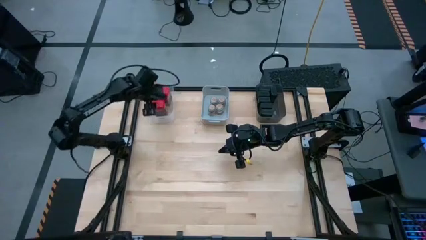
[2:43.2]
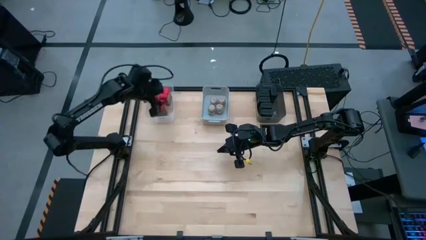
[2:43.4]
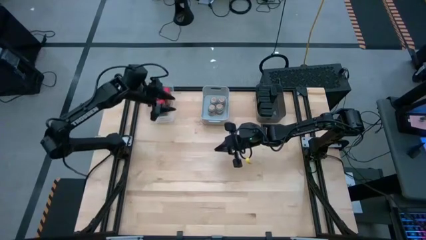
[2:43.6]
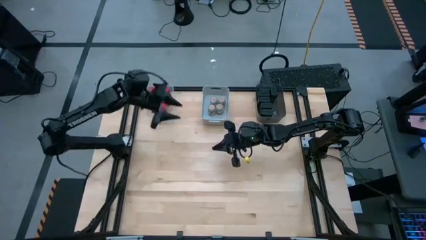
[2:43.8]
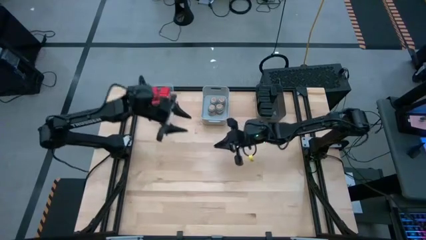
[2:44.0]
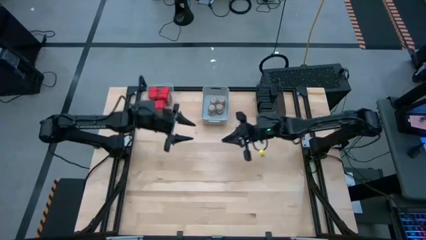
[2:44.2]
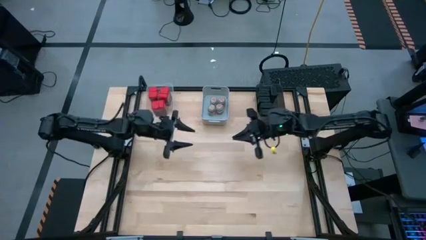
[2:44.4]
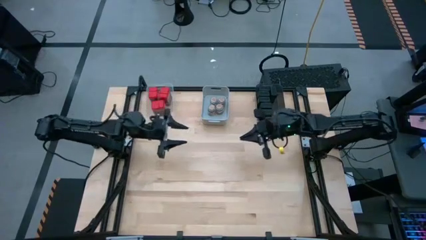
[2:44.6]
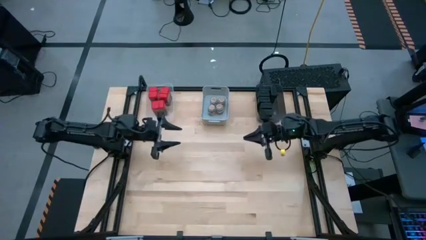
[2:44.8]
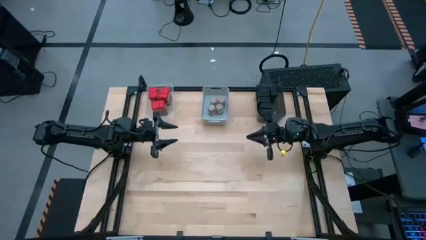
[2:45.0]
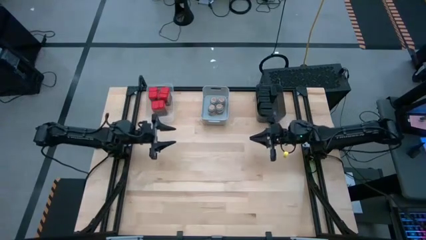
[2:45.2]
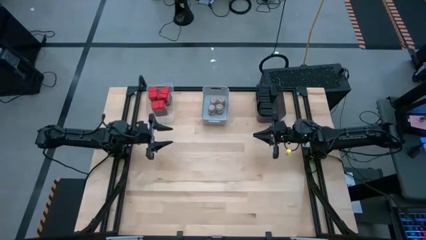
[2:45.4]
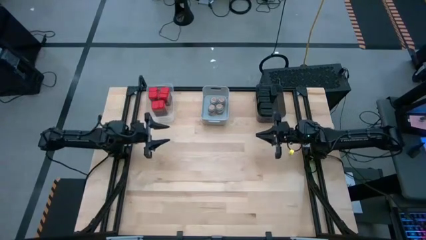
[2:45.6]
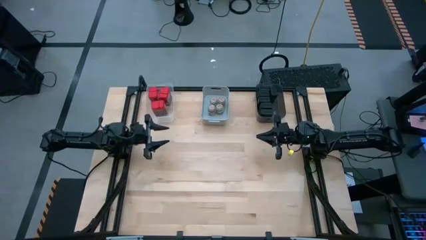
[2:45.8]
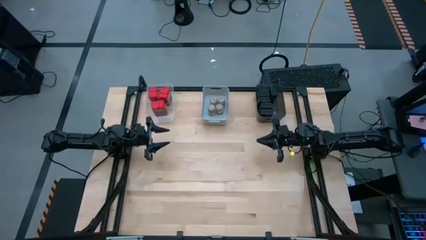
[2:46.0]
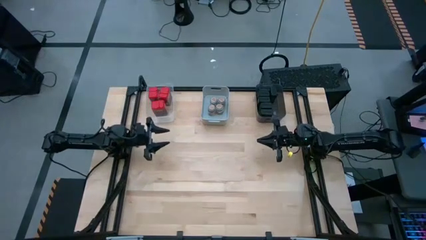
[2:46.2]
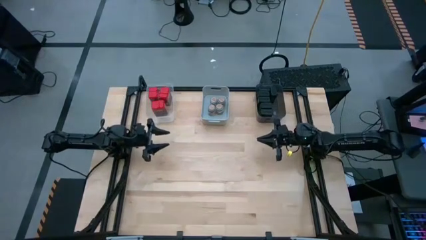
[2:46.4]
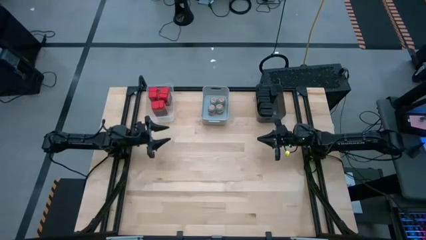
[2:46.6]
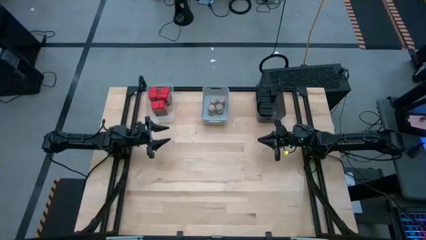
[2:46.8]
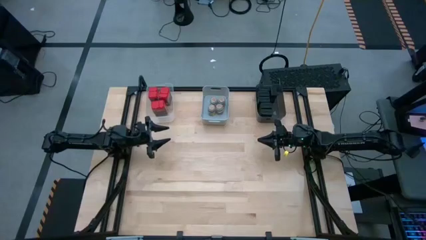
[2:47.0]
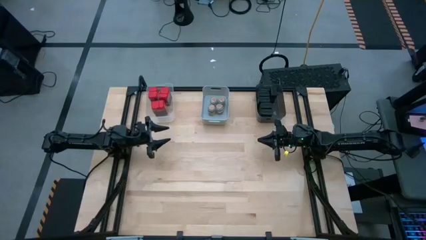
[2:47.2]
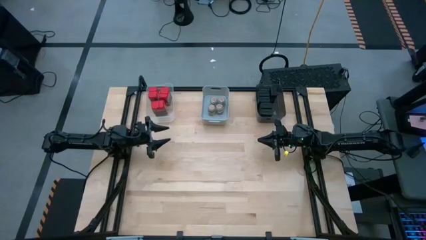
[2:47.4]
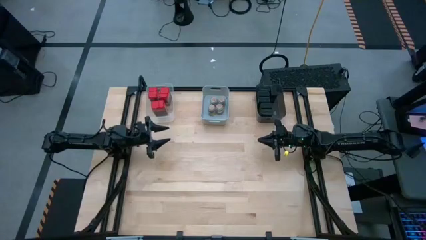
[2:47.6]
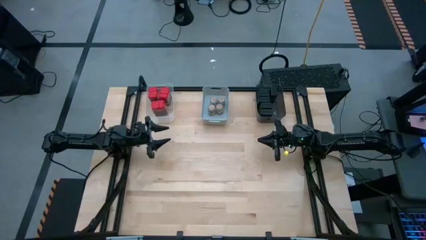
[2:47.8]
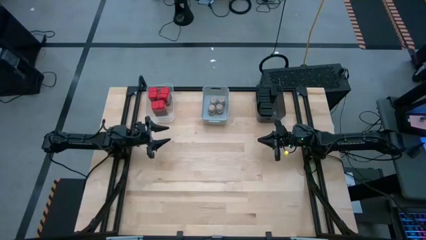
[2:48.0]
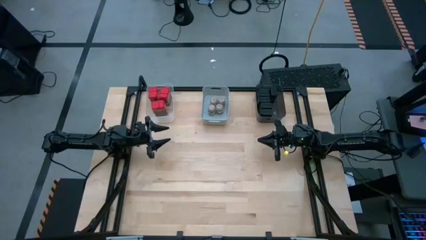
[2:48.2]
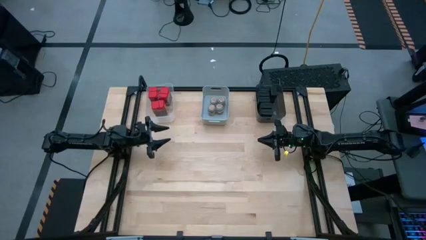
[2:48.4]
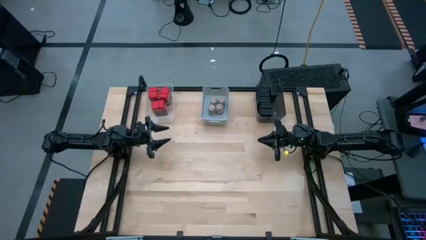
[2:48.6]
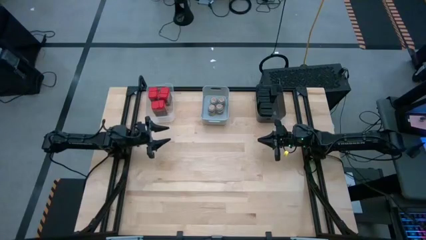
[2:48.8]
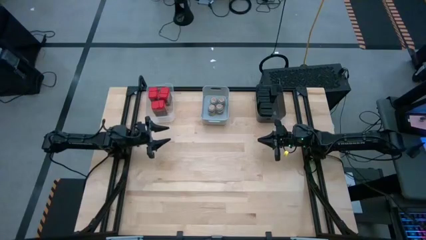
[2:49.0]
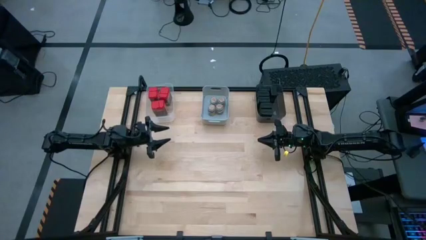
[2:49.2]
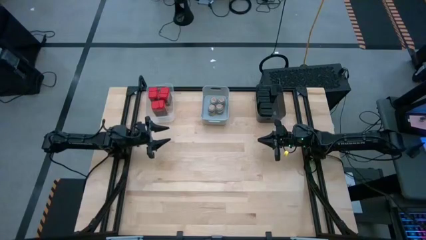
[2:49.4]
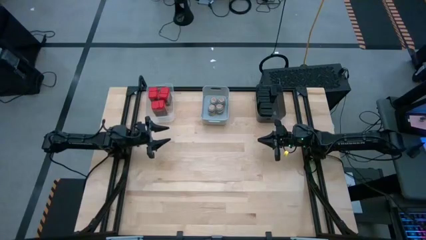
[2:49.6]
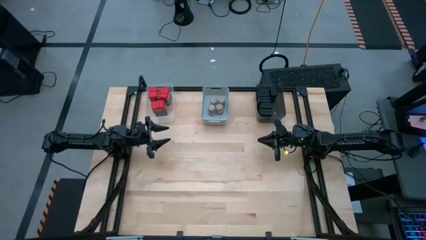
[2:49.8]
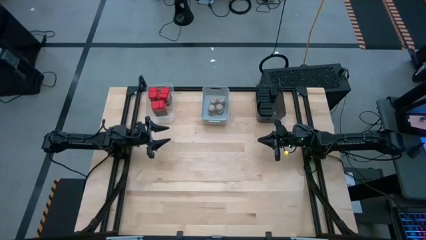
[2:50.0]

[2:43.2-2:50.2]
Task: Sort spices by type
Return to home position

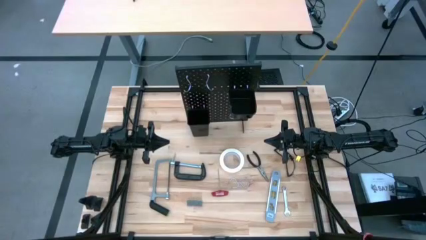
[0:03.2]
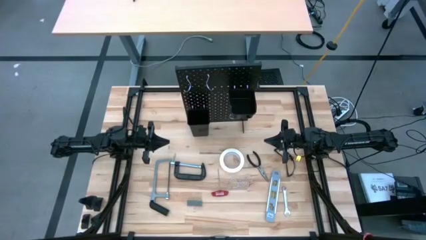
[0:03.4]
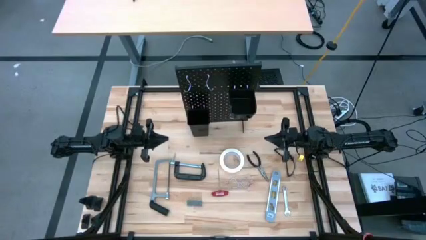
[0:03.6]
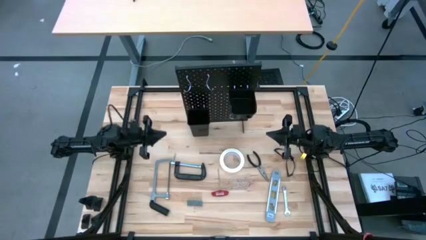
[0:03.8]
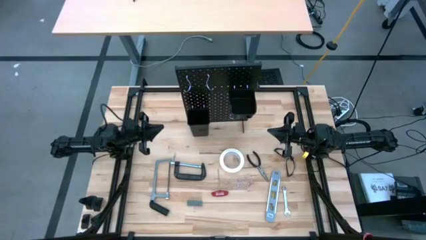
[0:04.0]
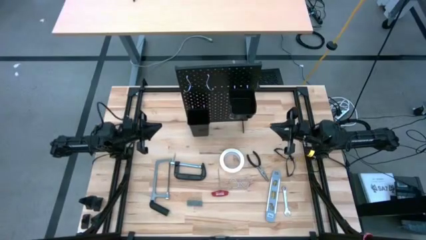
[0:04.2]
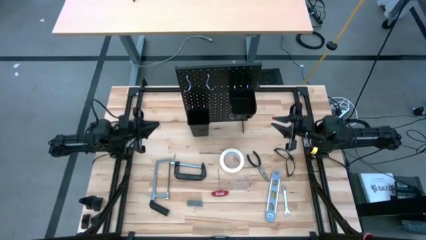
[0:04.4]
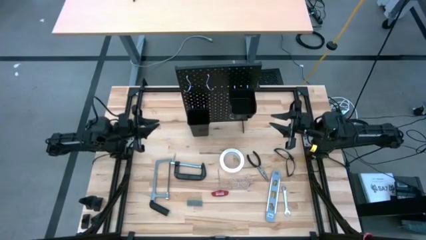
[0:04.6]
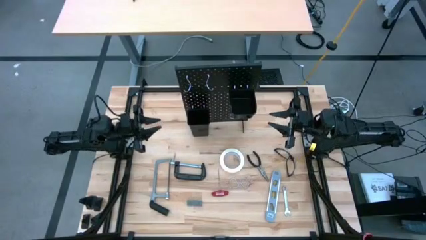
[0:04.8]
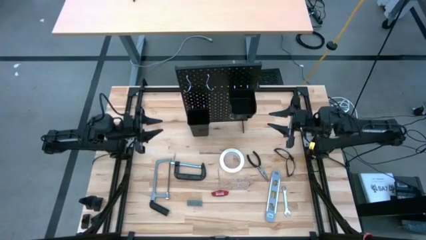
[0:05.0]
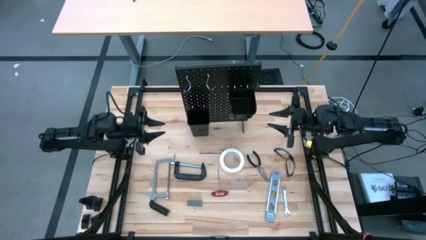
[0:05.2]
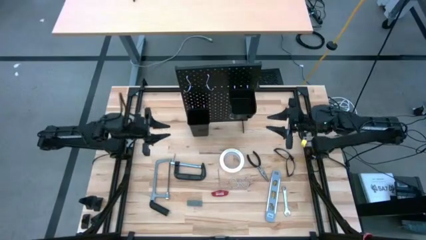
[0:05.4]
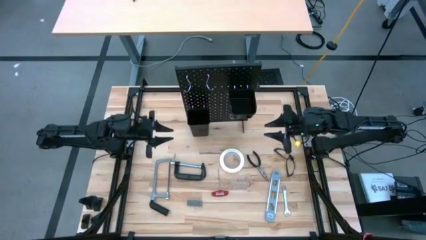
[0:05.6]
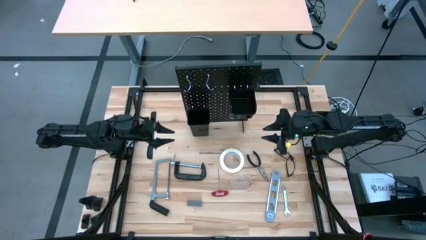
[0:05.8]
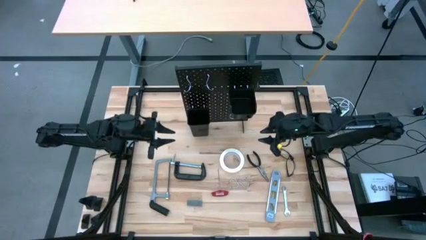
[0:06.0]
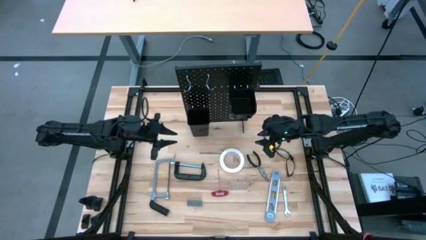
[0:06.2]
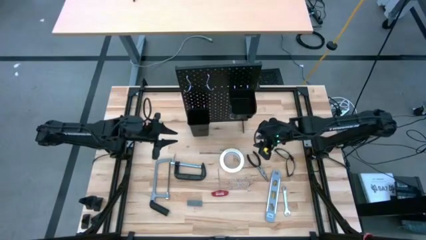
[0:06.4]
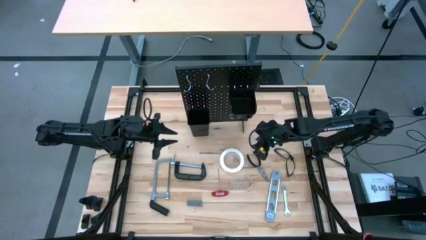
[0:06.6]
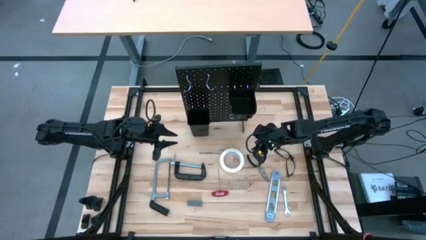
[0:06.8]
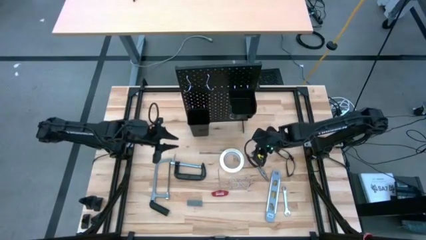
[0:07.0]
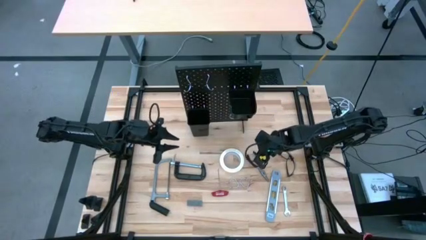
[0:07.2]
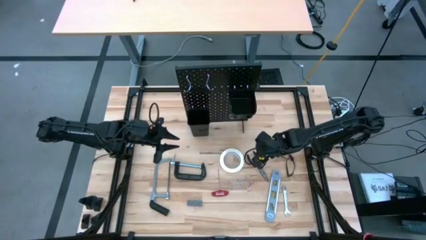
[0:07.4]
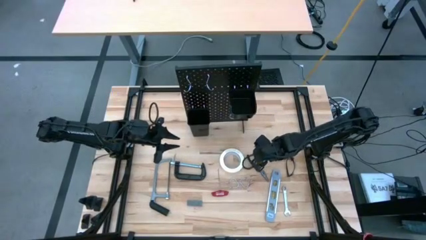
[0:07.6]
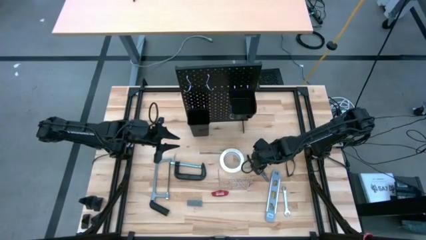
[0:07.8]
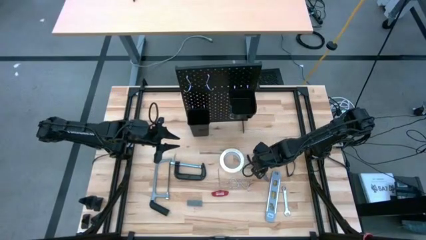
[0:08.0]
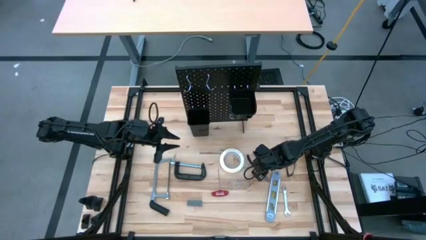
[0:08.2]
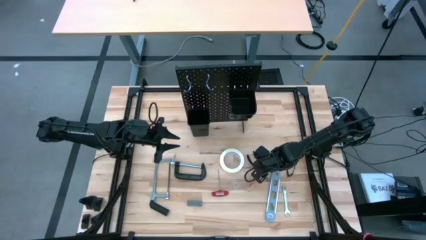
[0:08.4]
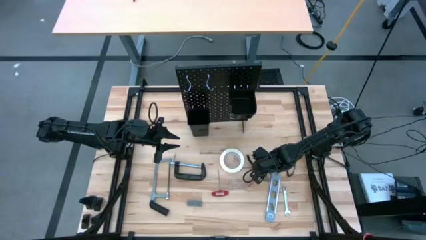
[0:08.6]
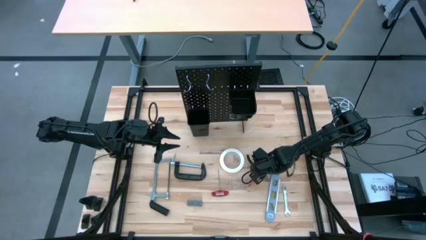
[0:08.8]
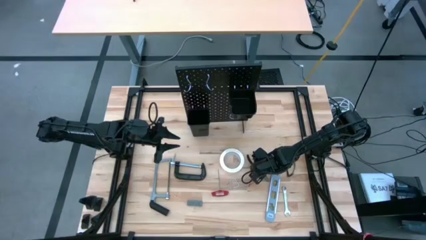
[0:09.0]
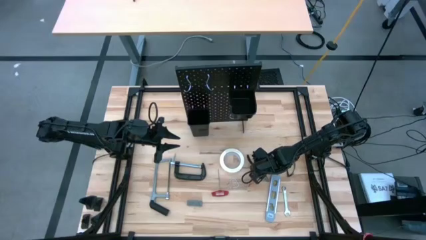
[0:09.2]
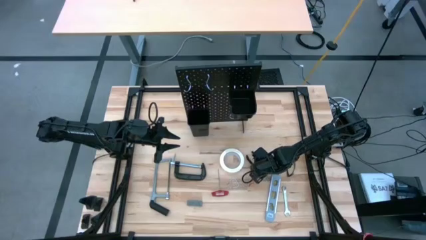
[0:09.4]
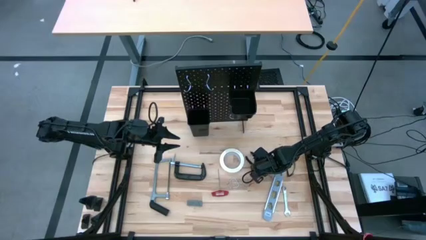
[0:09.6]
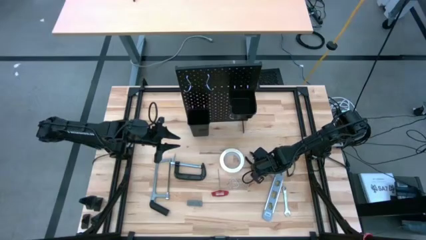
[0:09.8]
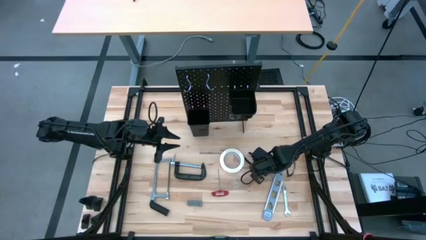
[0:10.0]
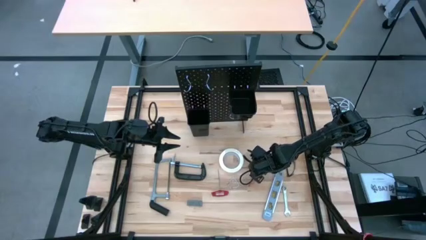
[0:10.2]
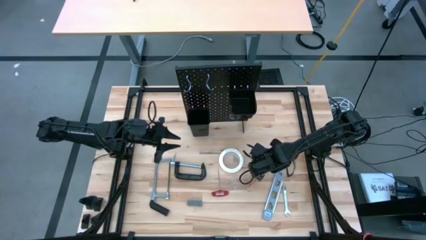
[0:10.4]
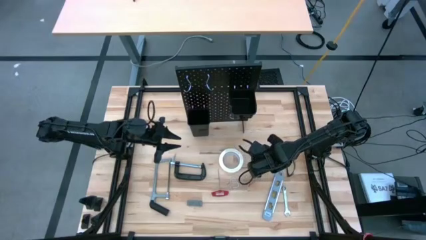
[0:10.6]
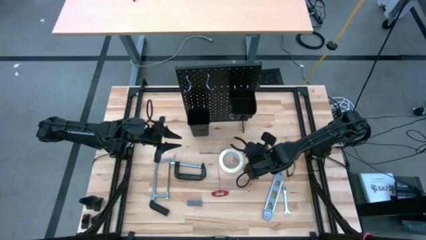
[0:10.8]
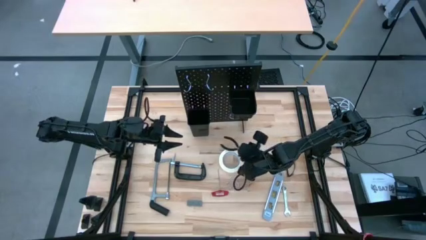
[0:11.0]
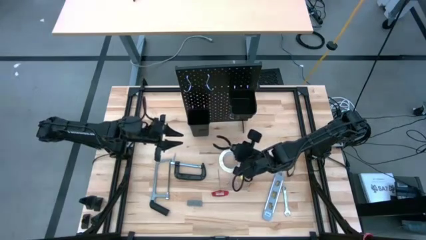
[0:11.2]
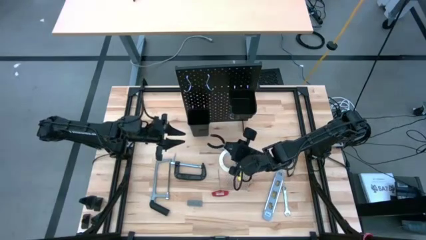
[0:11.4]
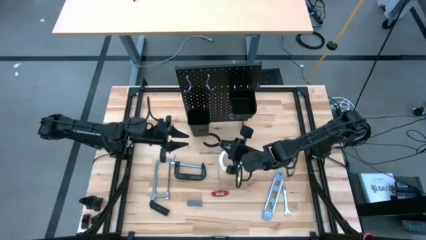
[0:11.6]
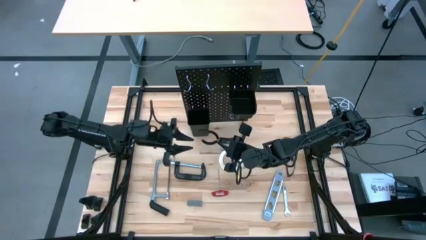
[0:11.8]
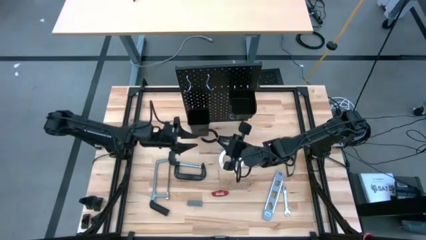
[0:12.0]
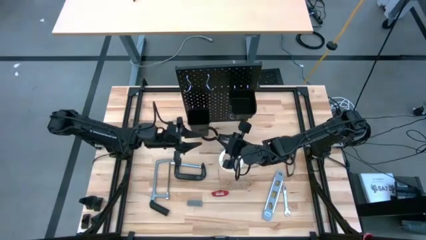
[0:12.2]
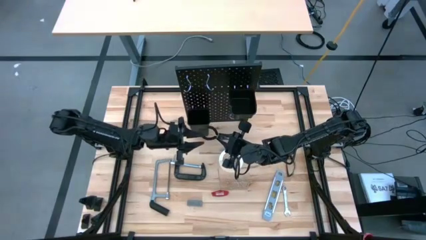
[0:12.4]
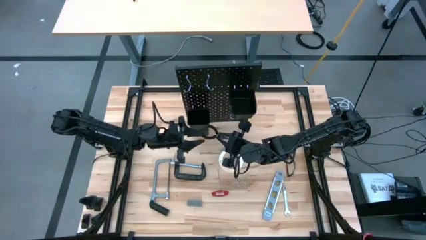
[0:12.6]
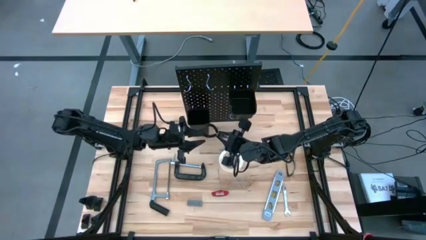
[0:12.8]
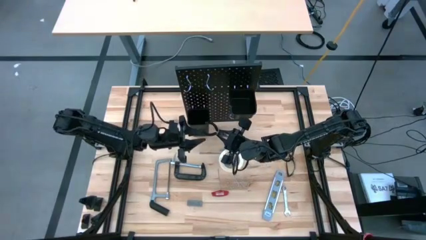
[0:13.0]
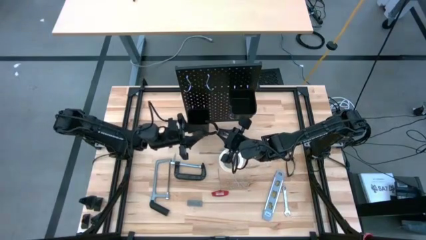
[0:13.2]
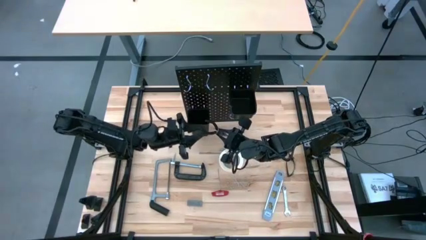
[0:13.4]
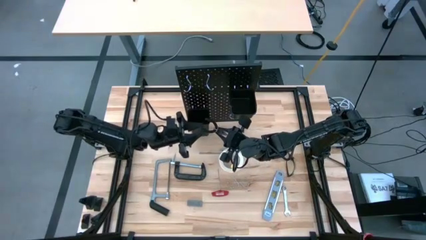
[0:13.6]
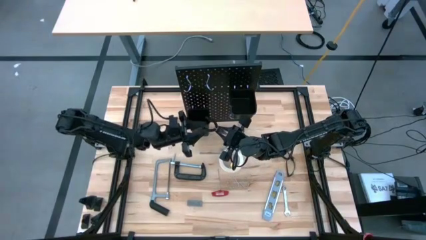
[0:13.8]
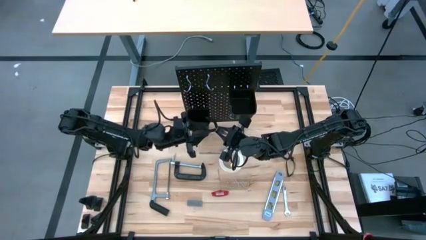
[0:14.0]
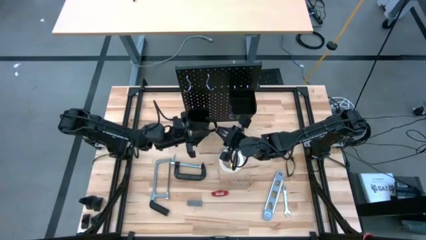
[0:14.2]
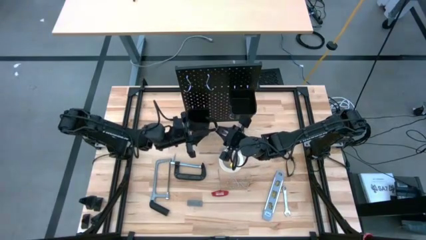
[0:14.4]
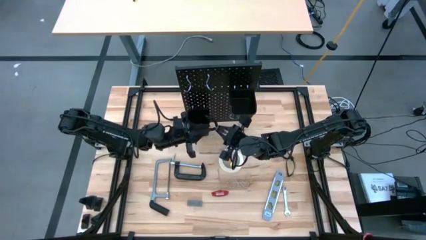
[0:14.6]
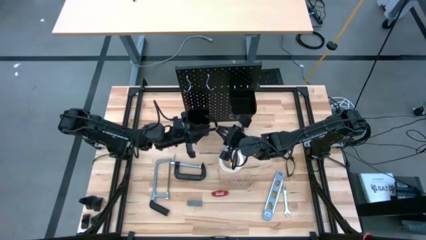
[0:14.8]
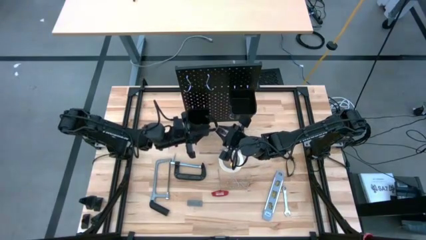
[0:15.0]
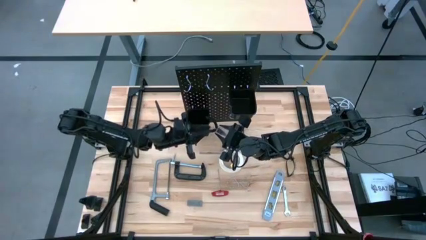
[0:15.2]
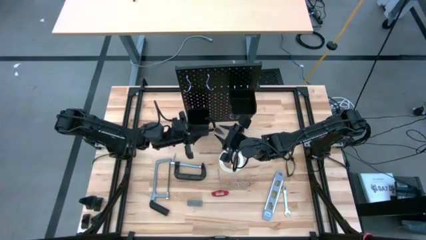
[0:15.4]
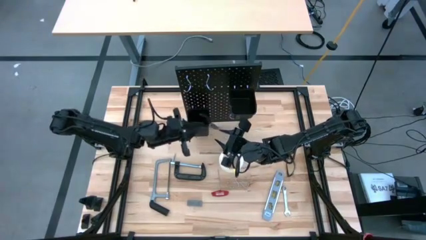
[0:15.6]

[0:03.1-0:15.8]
Task: Hang tools onto peg board
Put the black pliers into the left black tool bin
